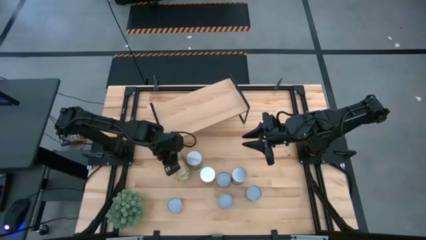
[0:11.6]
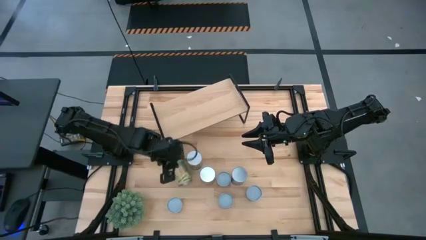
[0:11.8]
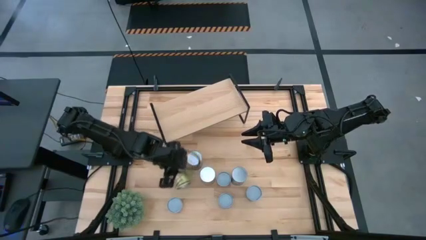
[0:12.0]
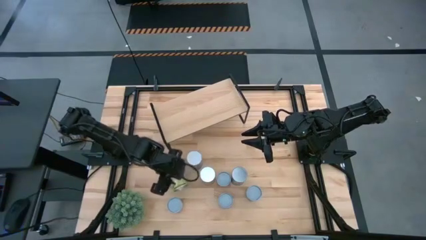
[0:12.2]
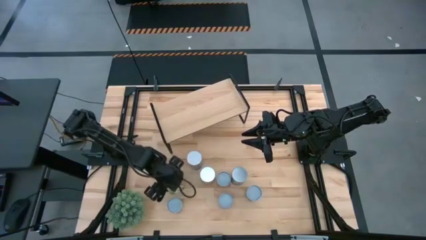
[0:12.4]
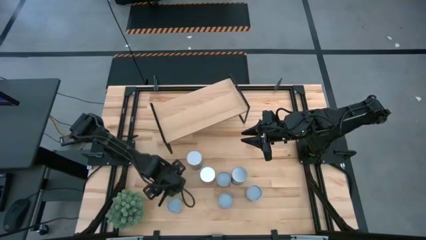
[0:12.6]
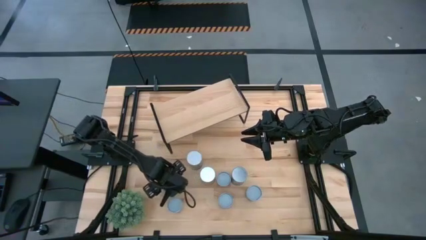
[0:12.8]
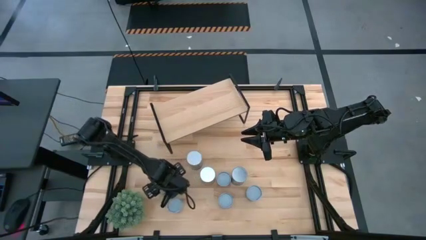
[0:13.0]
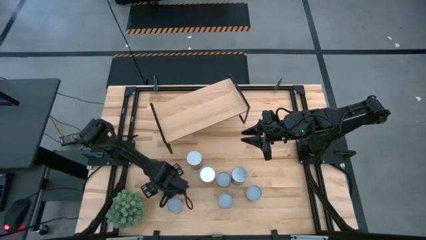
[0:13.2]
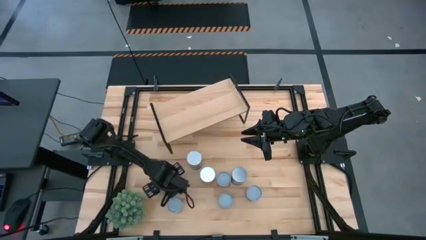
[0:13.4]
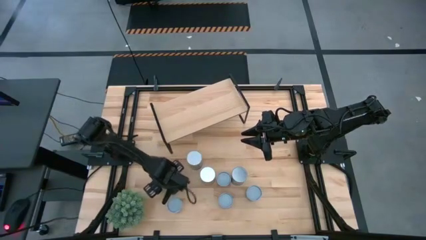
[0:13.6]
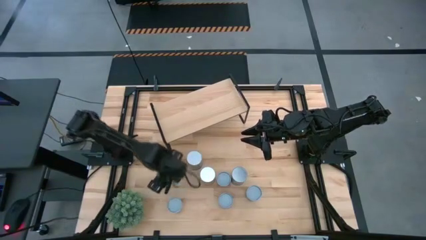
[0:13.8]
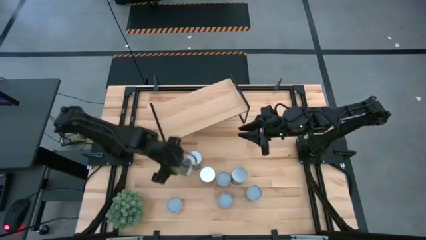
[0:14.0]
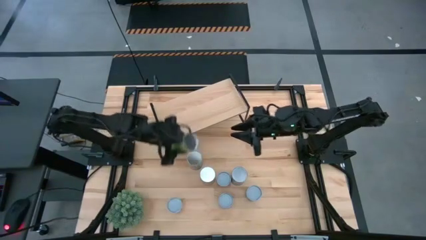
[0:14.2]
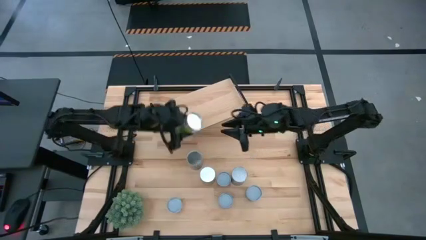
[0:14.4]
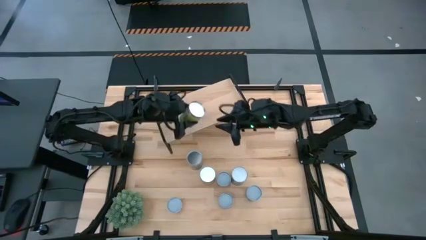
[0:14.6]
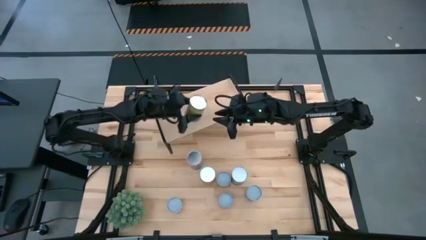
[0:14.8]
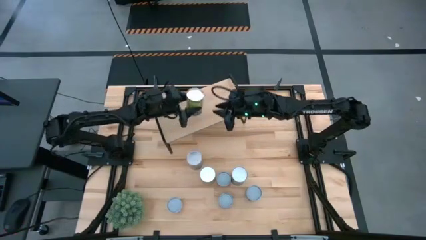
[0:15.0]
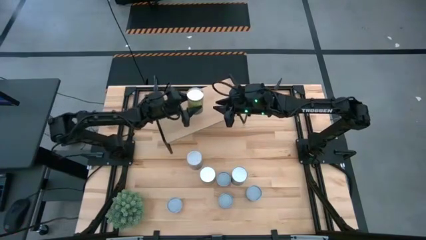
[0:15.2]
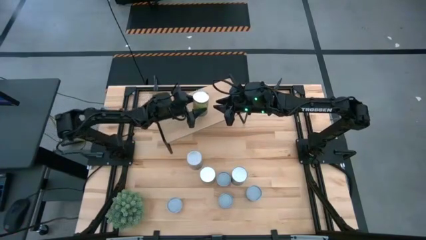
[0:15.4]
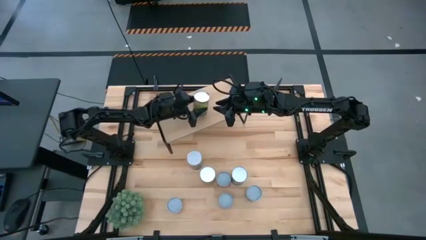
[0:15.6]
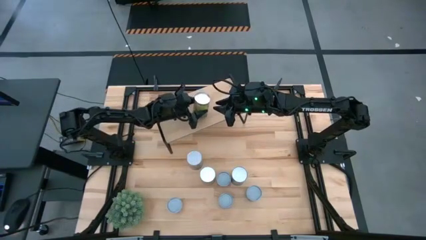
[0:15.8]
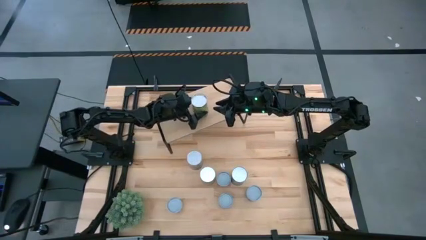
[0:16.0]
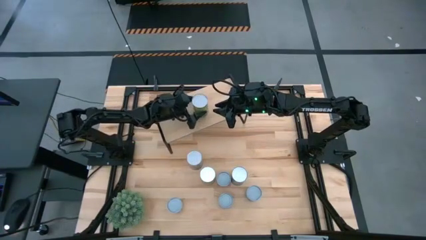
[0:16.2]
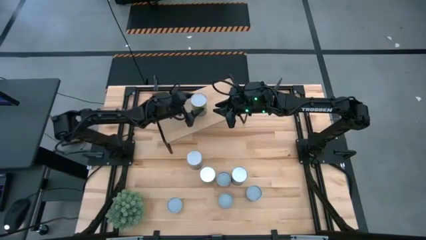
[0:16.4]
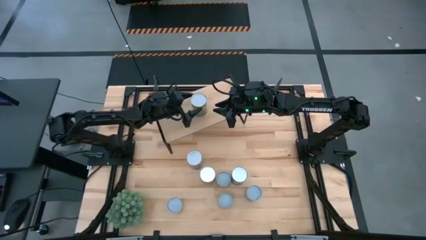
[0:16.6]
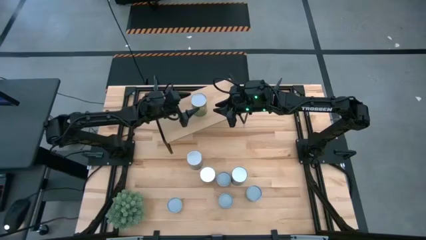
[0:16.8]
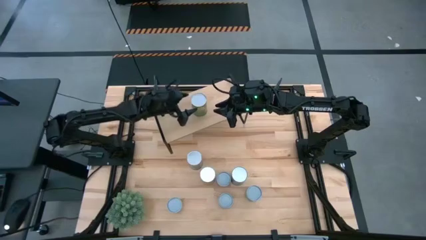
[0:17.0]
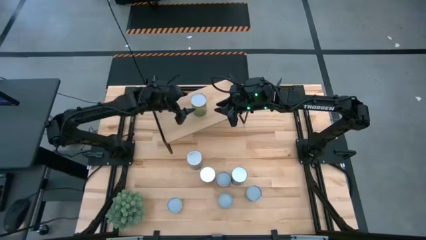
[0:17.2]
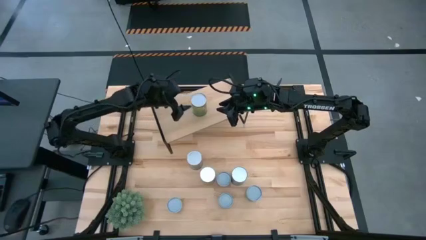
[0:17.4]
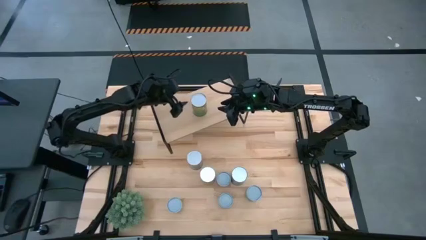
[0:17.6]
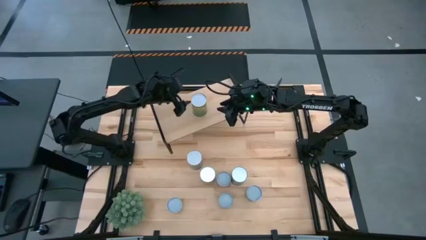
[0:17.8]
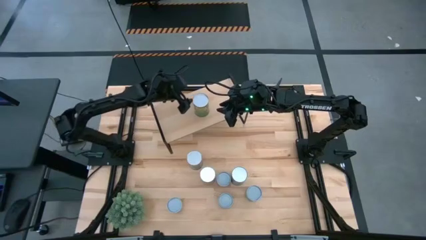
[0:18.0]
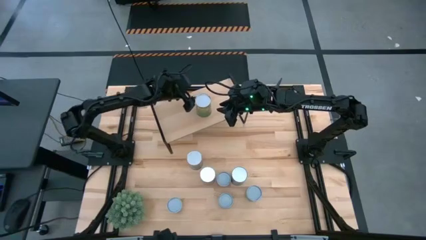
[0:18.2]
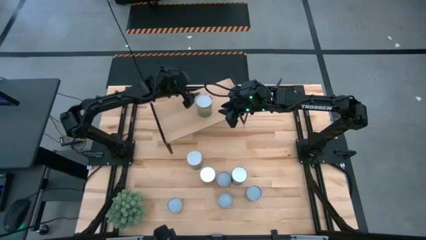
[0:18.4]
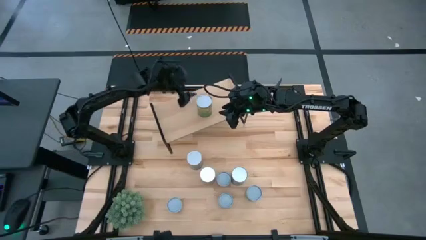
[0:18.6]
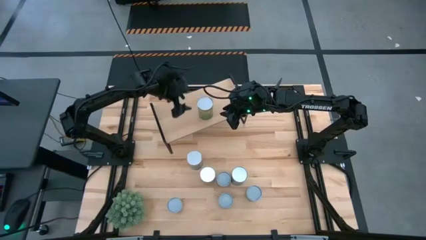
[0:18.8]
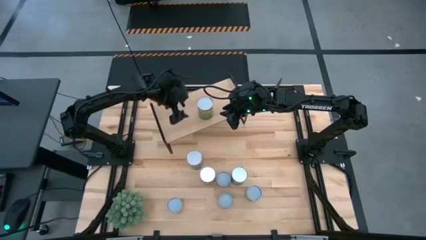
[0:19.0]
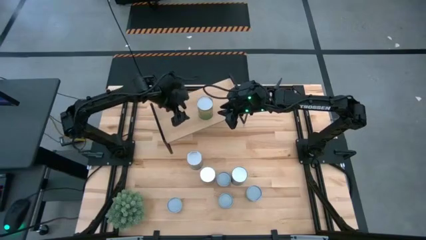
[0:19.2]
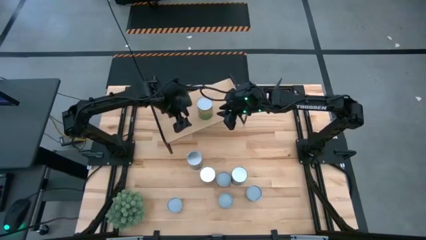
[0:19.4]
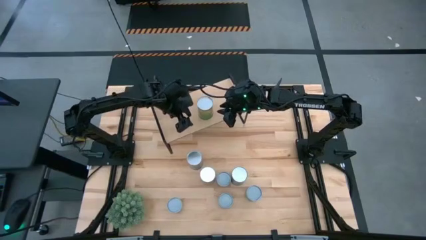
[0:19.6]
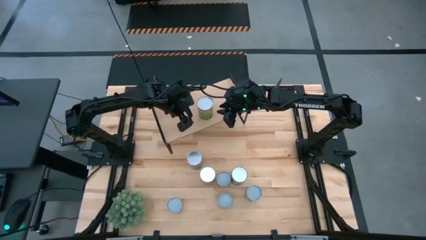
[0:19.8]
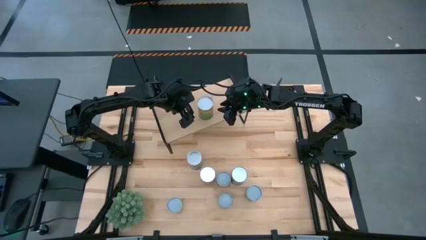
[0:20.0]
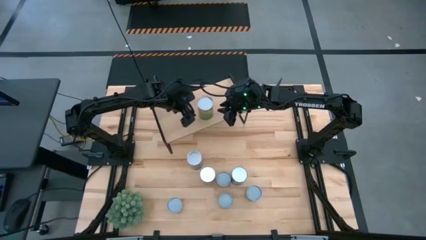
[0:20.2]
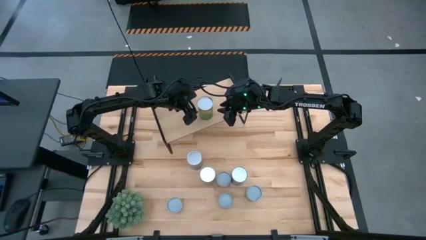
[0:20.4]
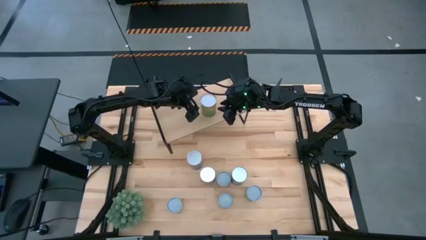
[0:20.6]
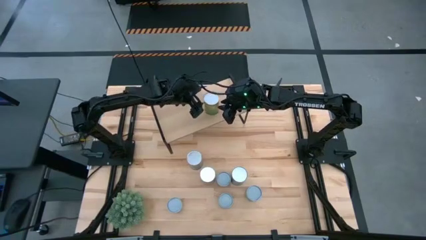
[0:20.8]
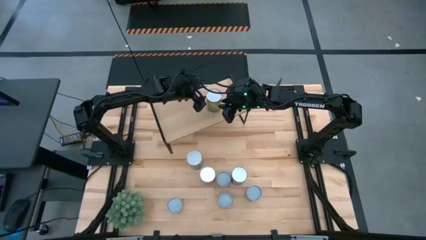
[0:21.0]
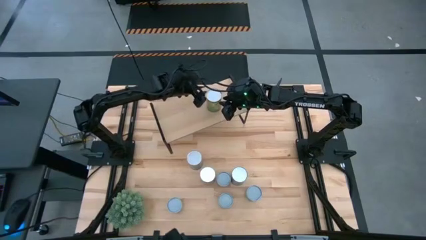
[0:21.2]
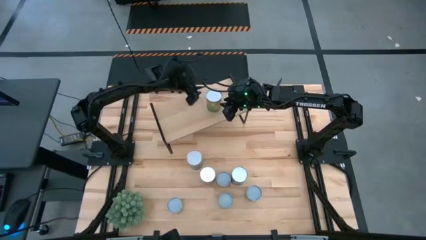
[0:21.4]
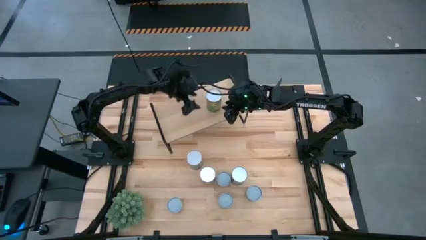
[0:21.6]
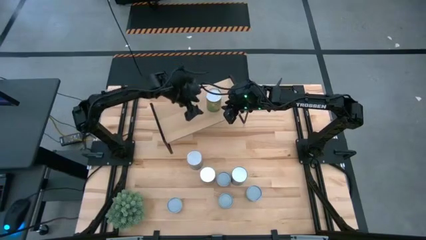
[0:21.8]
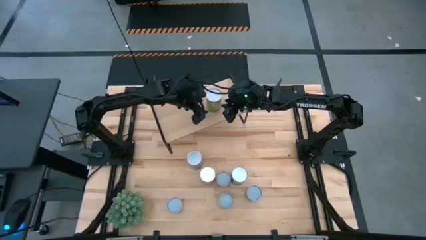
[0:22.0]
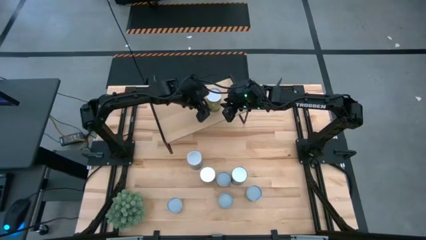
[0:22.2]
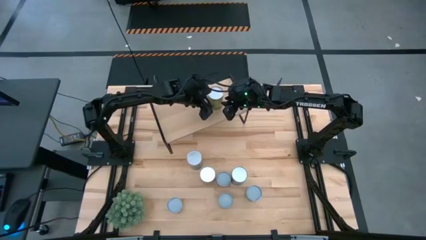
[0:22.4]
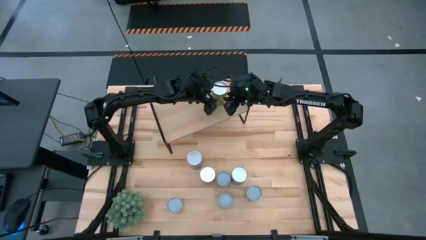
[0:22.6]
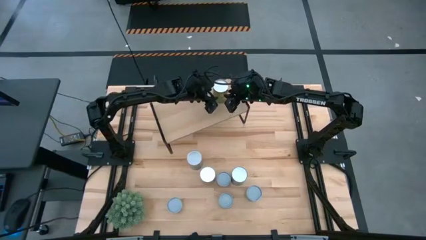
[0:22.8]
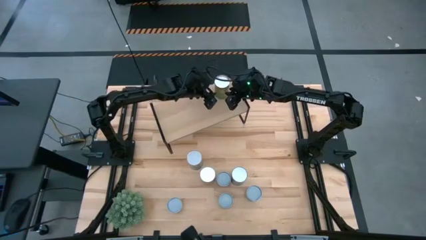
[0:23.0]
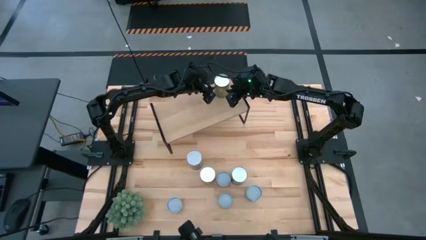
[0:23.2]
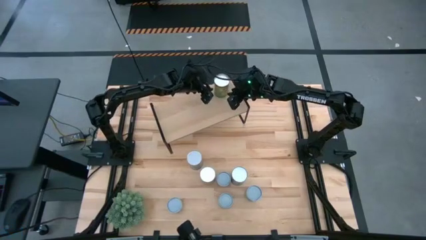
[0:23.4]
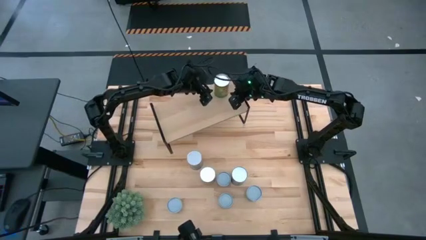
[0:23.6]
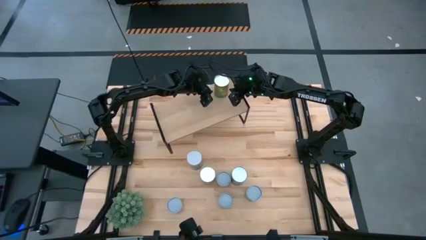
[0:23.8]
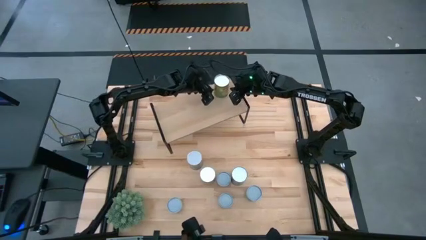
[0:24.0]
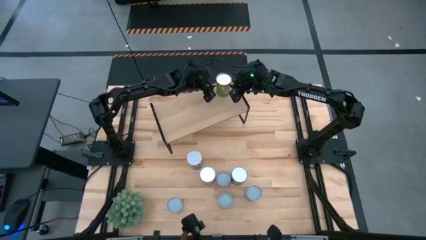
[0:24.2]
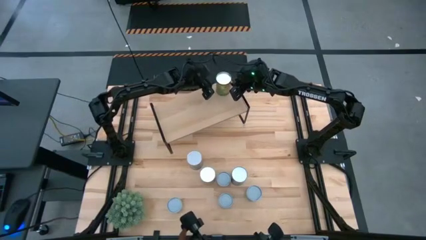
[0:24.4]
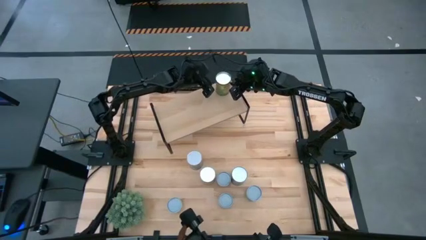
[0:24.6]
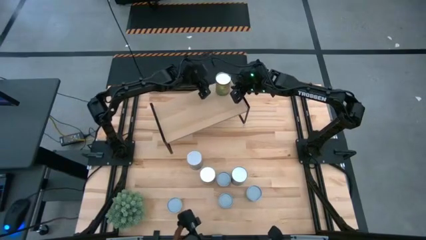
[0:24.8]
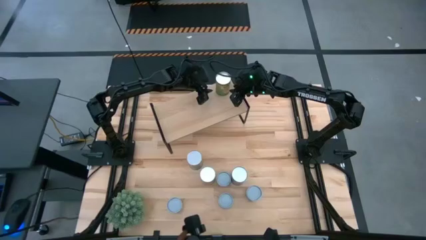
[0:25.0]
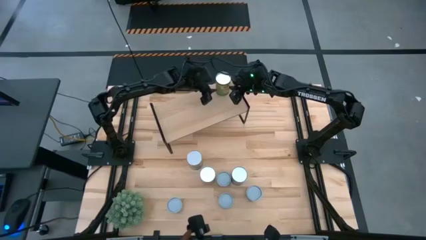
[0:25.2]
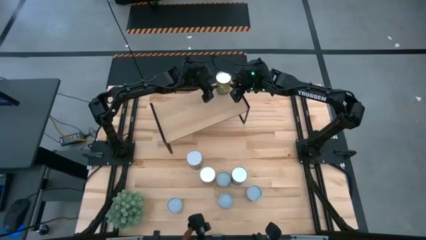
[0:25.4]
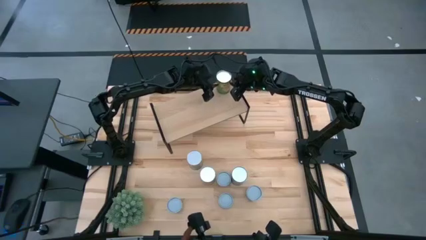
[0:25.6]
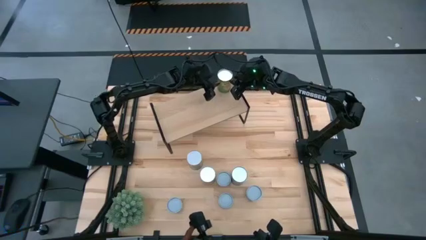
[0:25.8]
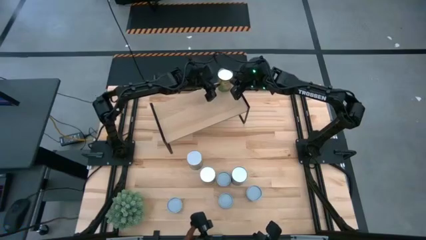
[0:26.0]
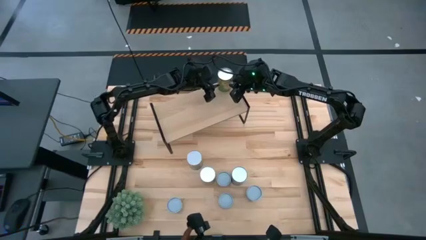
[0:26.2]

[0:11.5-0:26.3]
Task: Pick and place cans onto a shelf
Put the canned oranges on the shelf
